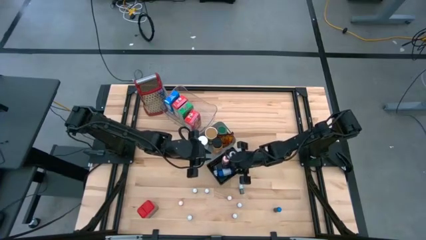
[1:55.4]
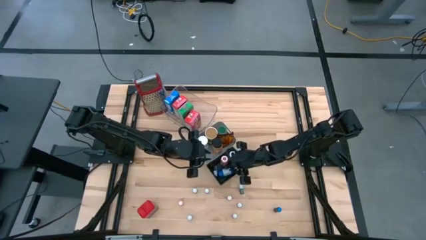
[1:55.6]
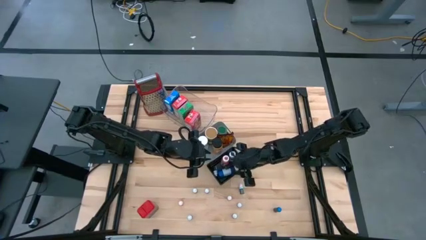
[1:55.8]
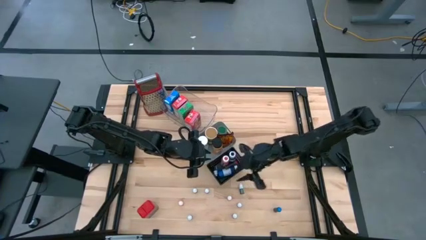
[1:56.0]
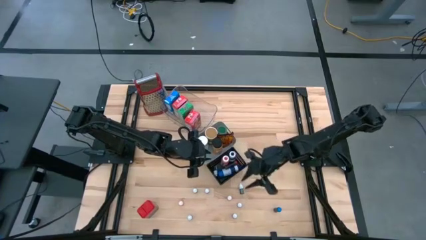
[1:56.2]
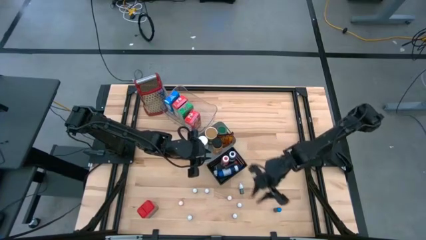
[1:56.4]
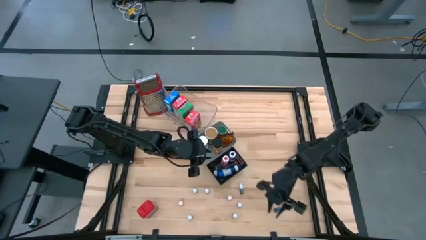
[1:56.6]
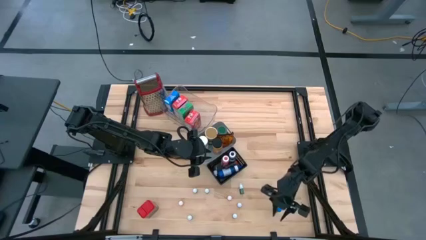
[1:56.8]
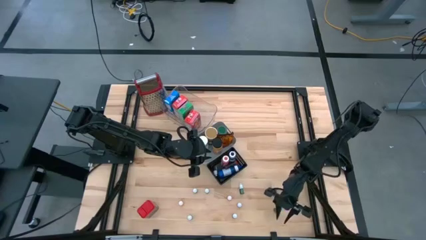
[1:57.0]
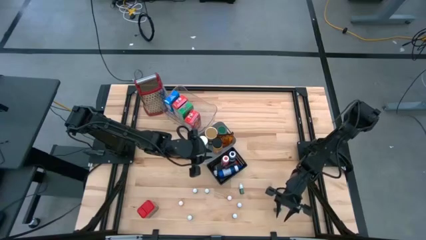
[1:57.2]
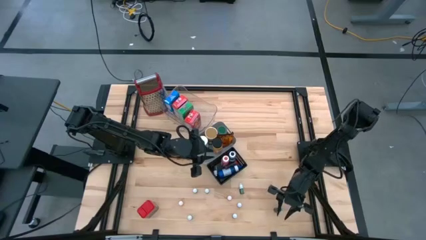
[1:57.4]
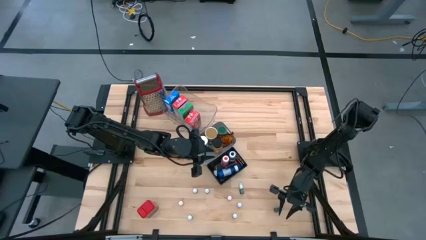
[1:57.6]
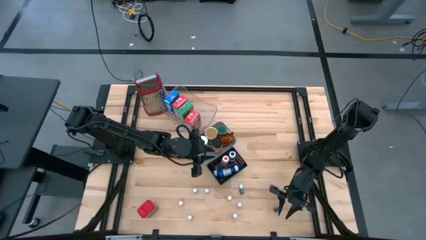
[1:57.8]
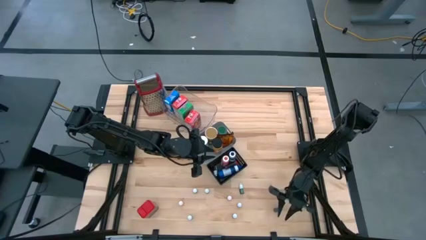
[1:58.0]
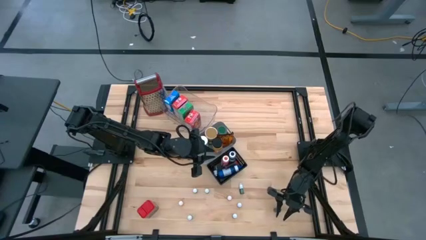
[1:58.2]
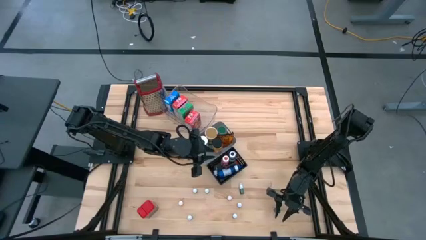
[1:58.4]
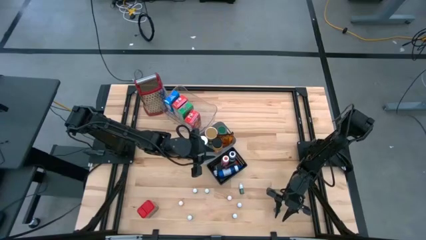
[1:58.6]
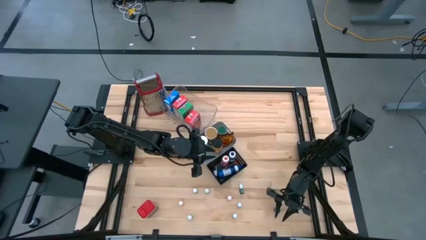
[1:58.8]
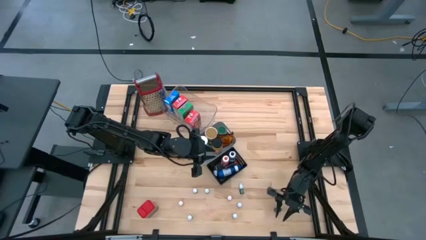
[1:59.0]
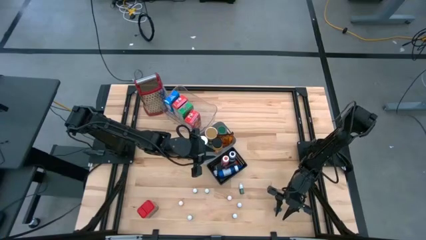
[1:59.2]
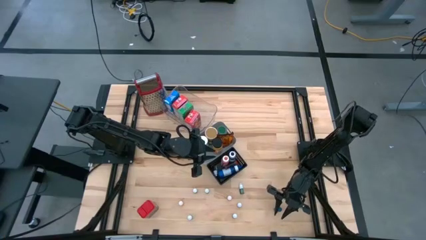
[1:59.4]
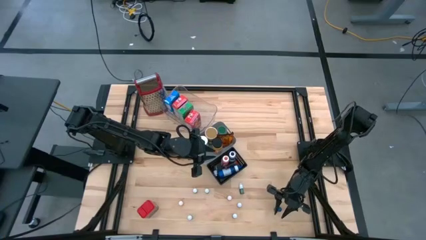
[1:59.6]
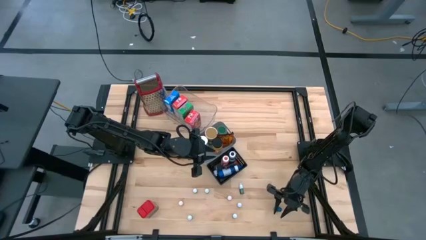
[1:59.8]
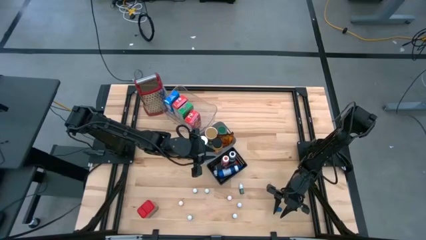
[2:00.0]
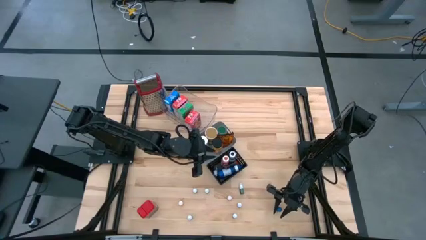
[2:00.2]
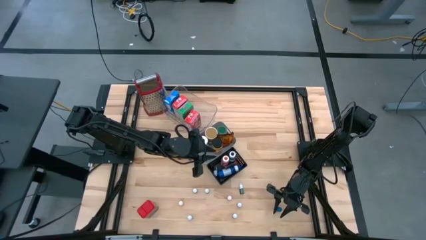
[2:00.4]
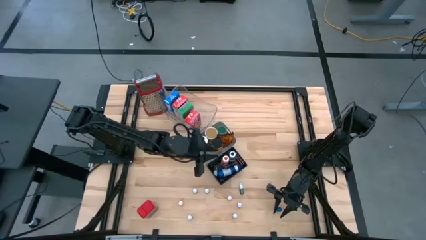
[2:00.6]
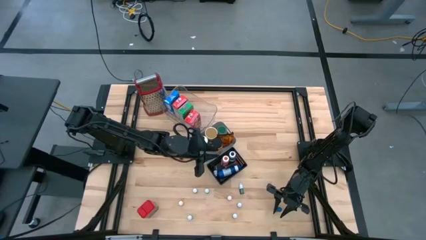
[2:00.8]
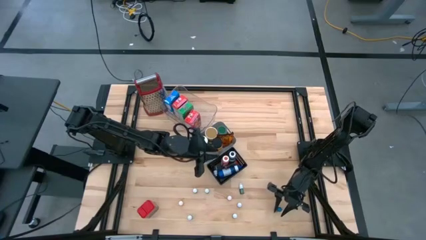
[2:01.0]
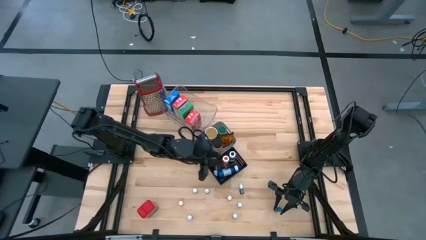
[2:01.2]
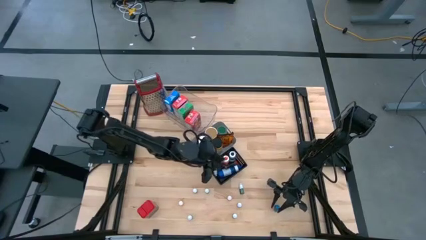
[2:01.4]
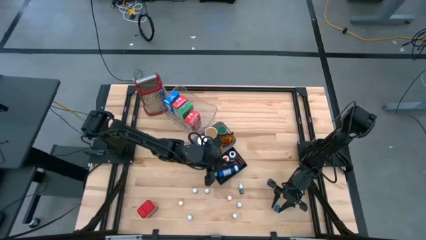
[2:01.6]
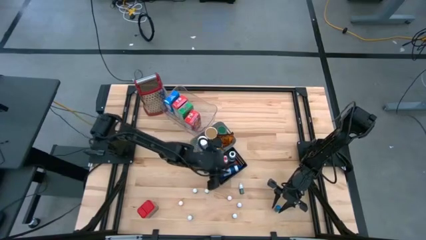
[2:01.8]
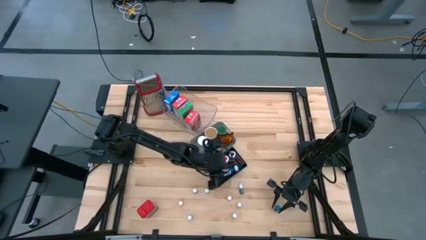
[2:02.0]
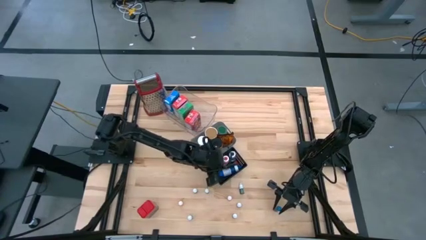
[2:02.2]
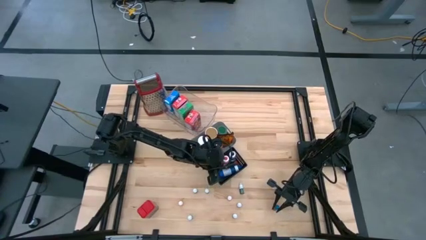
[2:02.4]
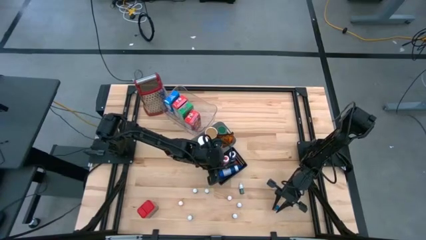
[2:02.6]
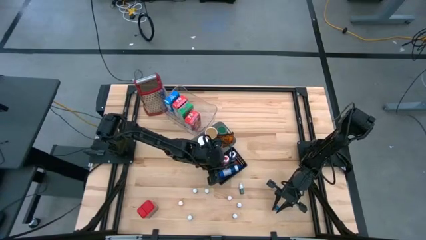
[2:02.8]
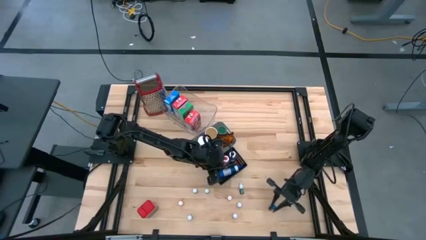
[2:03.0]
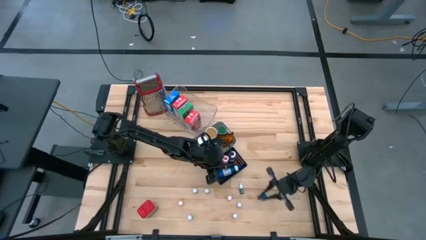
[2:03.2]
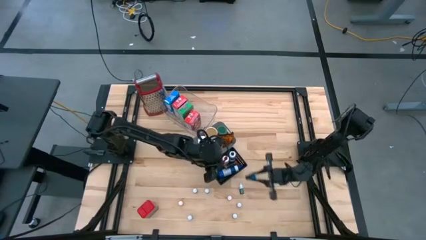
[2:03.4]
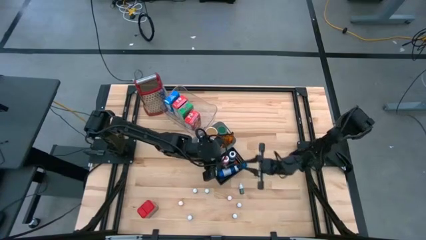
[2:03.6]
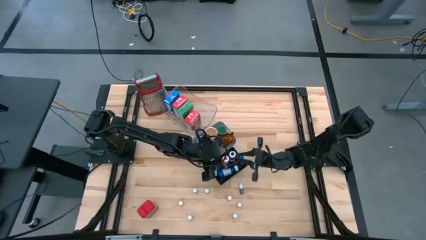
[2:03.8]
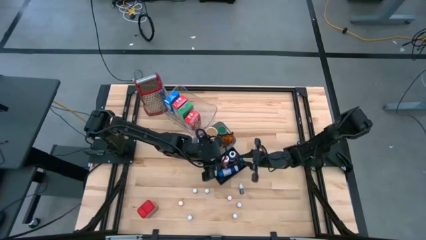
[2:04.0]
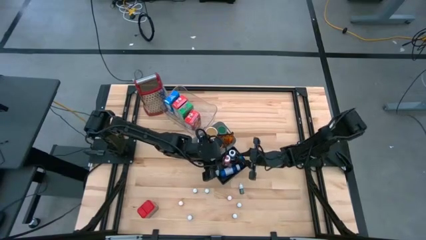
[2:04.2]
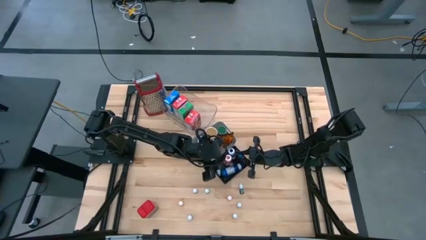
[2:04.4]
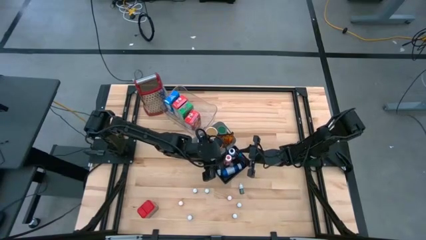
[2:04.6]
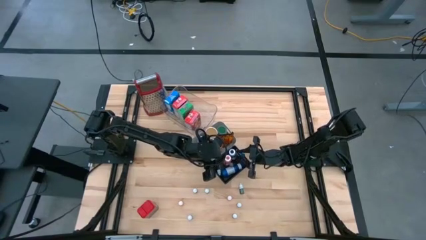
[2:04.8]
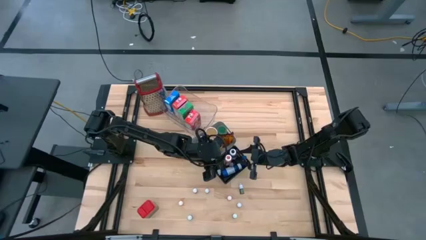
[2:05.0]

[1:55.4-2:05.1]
Task: Pick & Place Kitchen Items
Put the blue black food coloring into the black bin

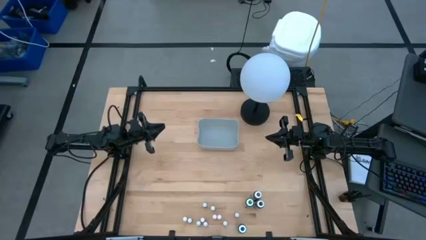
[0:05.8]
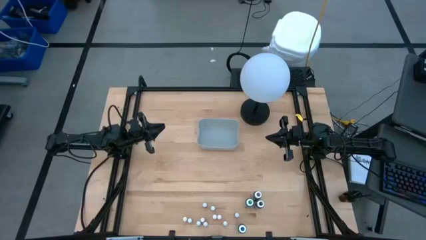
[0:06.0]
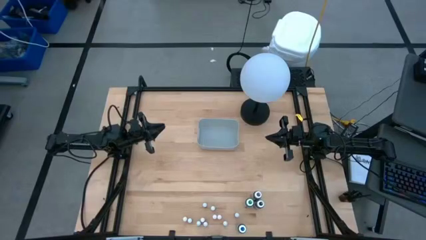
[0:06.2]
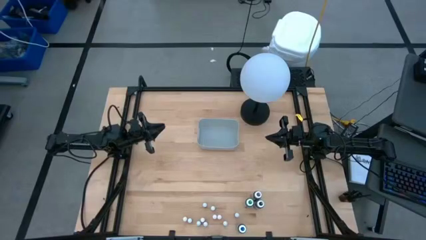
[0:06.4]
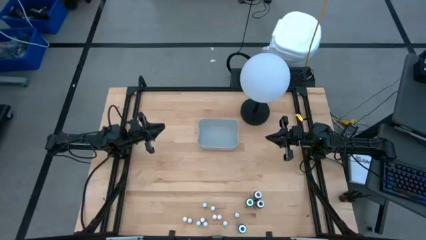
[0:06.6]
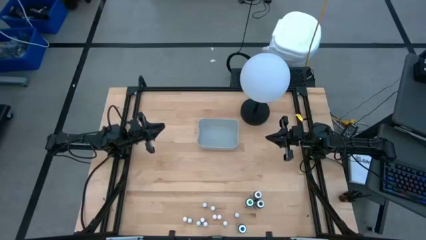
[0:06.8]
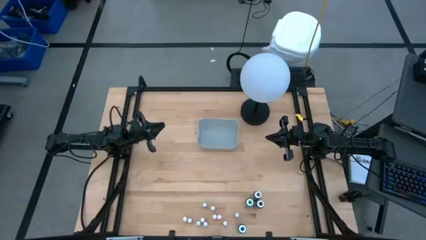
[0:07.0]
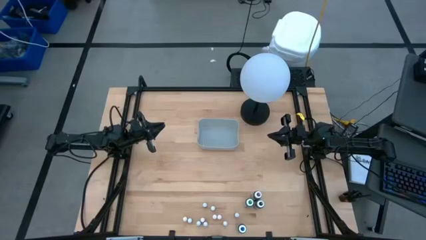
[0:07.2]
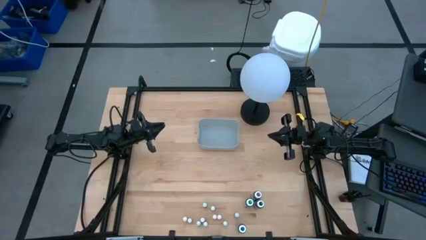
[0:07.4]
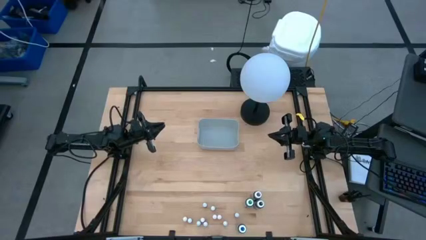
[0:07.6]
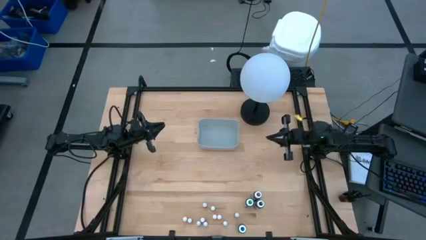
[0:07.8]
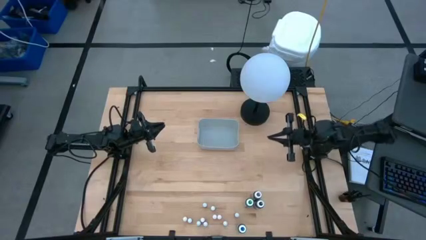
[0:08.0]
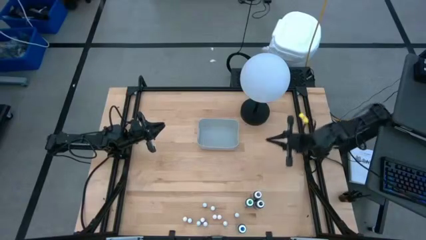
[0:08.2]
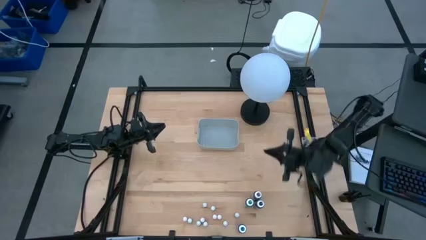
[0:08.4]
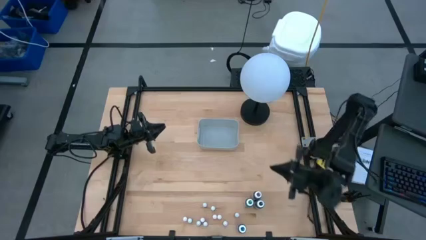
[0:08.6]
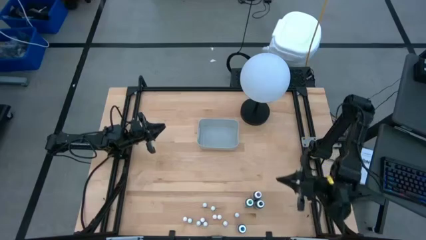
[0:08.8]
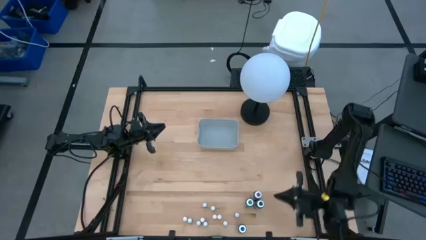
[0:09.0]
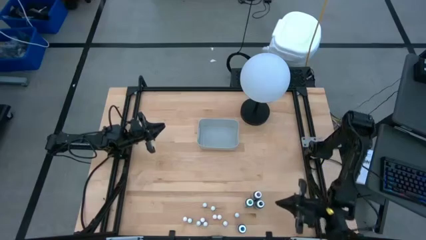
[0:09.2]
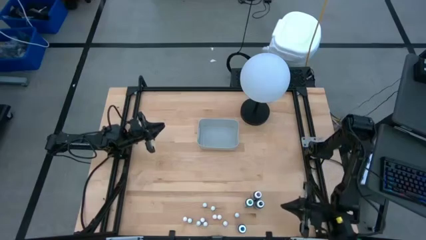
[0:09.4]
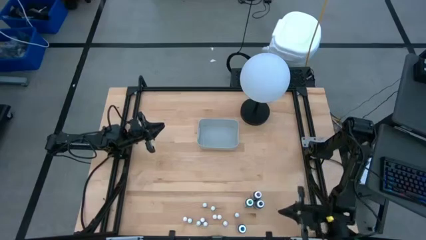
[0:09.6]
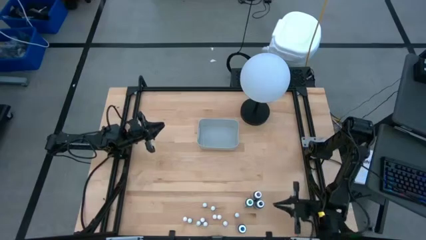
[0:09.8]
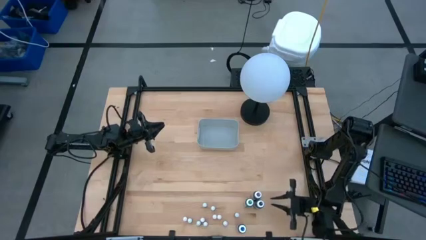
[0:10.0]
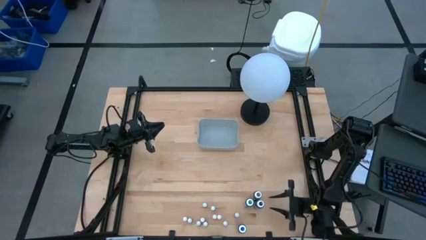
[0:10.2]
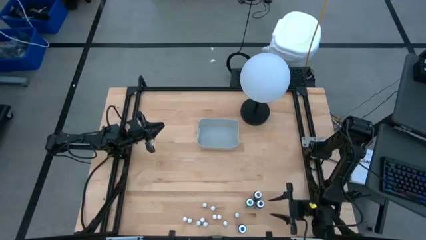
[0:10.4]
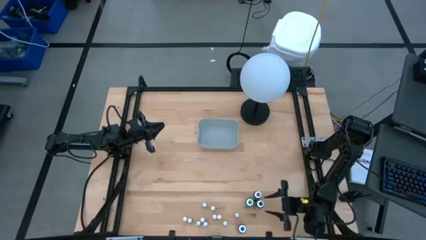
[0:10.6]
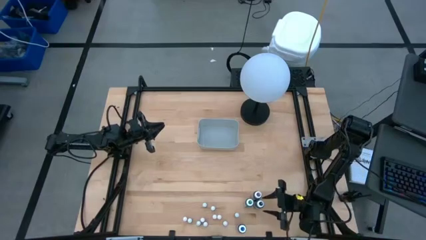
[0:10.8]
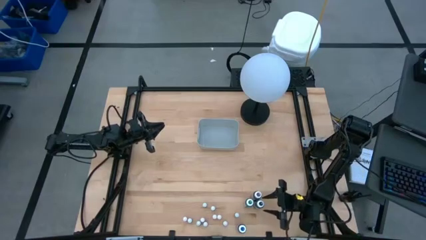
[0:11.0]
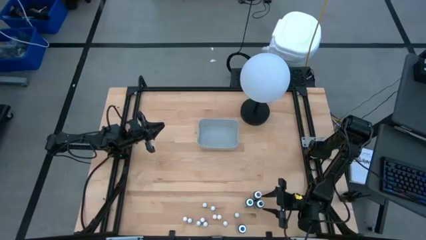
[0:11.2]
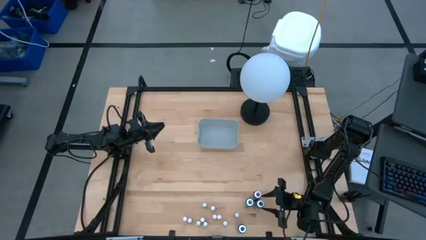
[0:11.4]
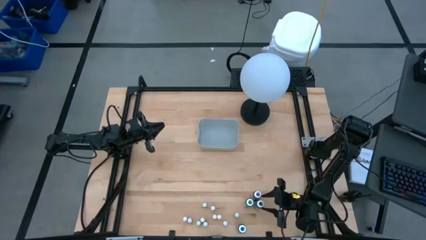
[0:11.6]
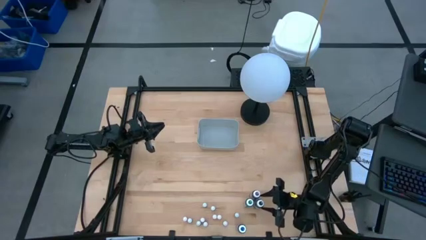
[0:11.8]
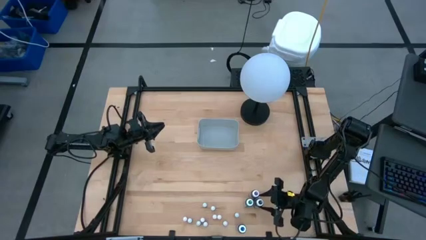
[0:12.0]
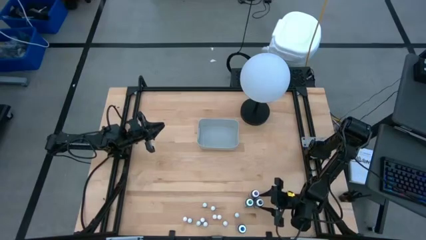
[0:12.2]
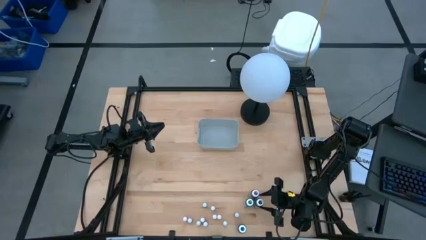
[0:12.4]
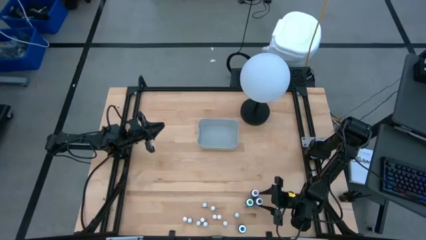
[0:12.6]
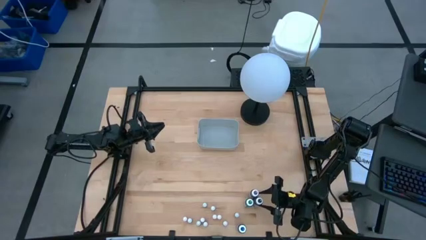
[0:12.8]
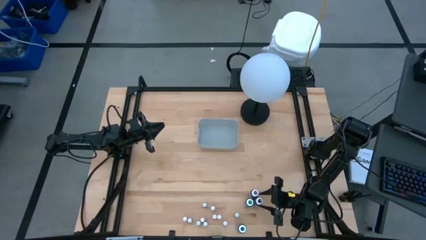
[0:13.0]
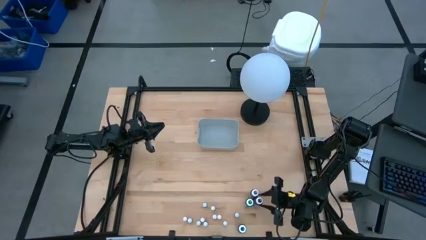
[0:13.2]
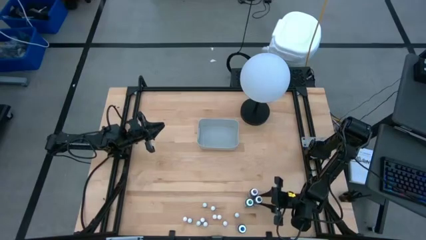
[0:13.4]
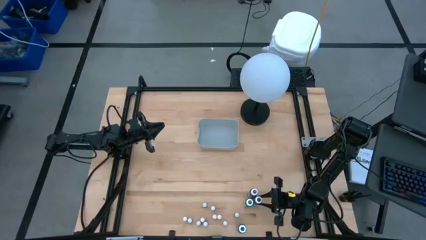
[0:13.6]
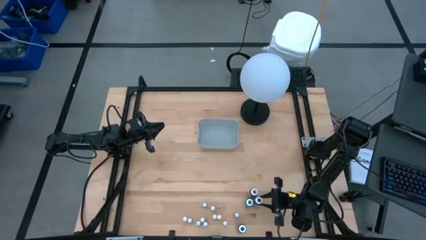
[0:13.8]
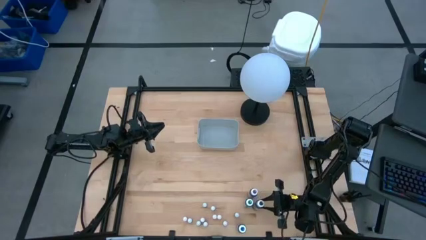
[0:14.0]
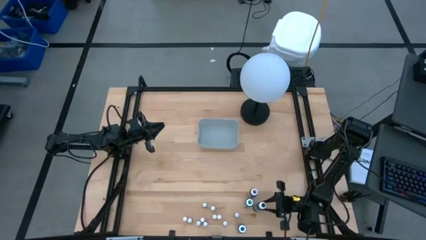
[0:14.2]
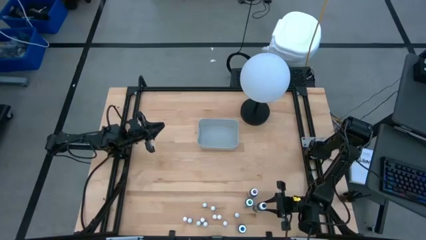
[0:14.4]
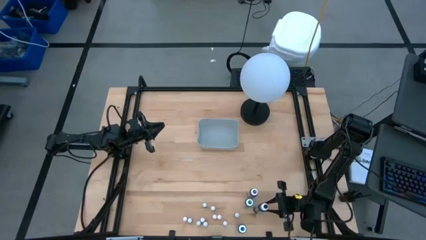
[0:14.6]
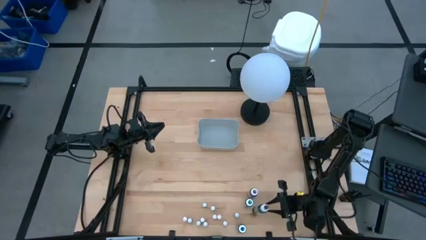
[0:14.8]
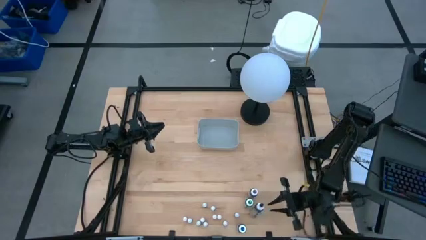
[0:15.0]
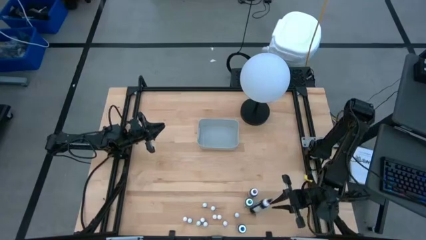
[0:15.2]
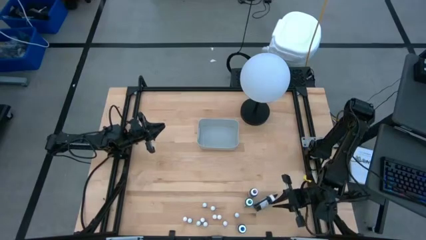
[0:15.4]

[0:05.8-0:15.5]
Task: Pick & Place food coloring
Put the large black food coloring bottle into the gray bin
